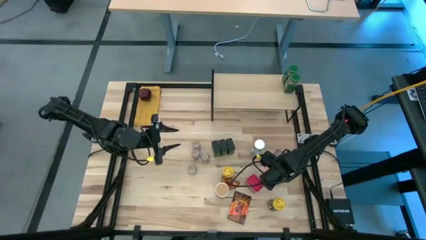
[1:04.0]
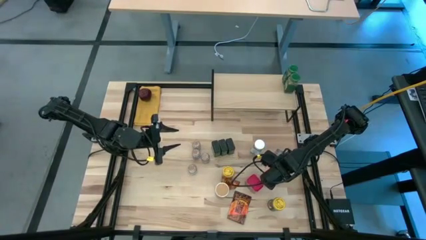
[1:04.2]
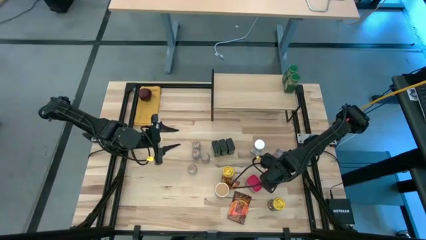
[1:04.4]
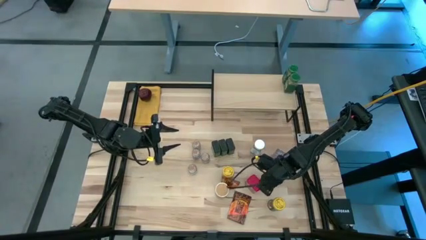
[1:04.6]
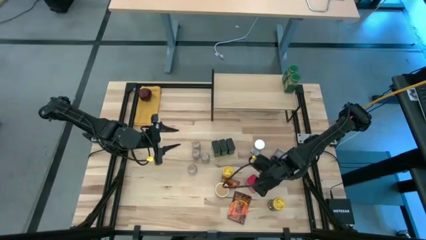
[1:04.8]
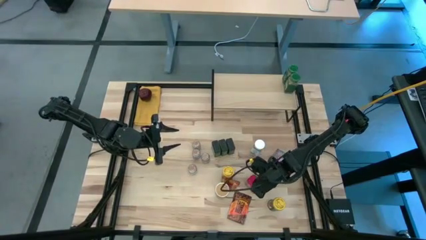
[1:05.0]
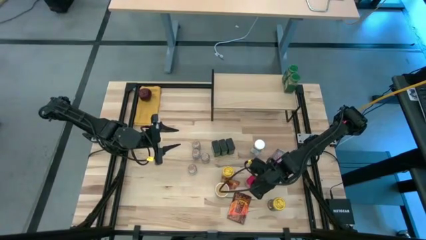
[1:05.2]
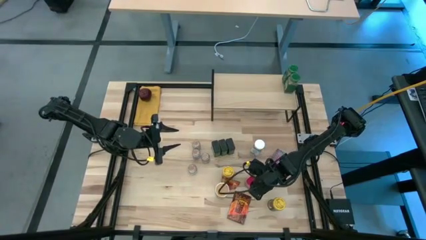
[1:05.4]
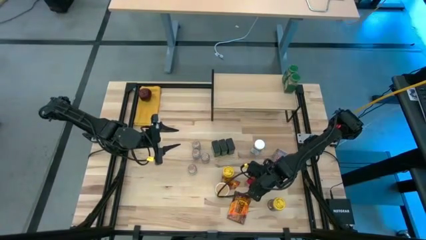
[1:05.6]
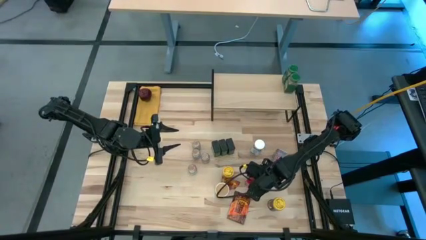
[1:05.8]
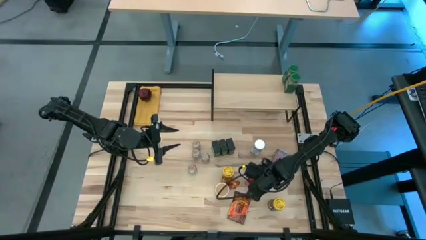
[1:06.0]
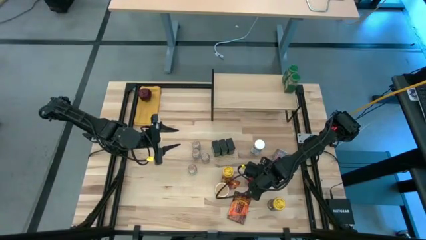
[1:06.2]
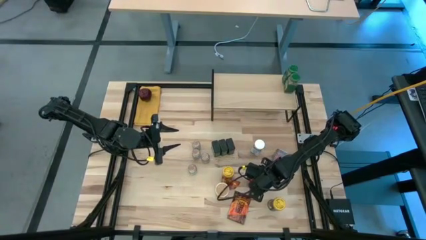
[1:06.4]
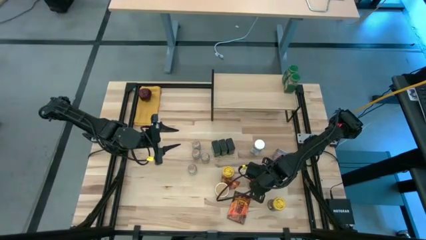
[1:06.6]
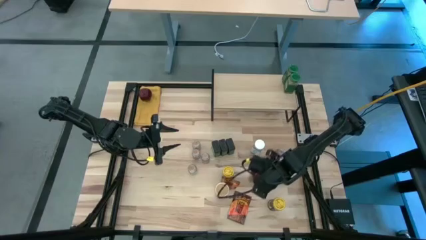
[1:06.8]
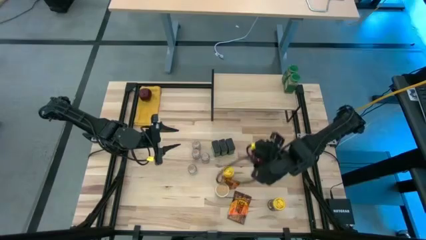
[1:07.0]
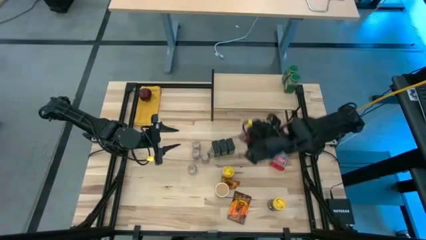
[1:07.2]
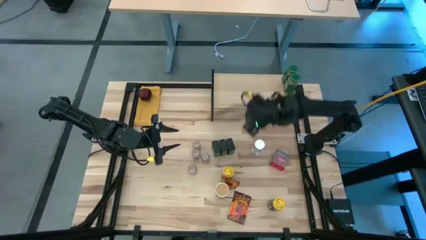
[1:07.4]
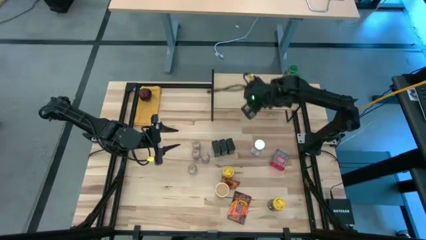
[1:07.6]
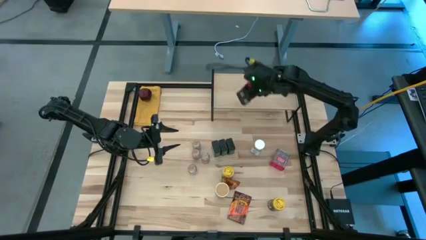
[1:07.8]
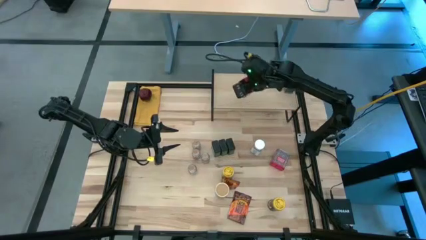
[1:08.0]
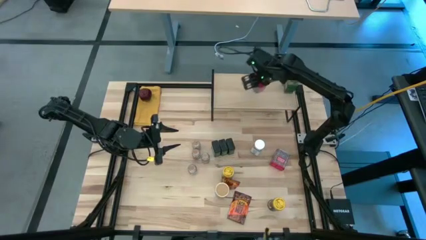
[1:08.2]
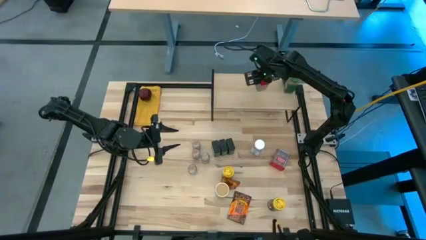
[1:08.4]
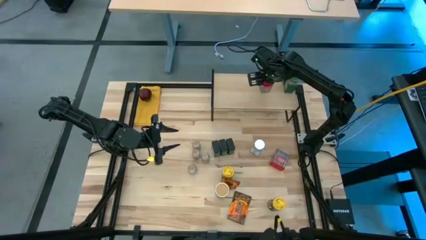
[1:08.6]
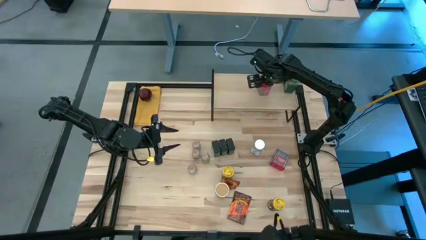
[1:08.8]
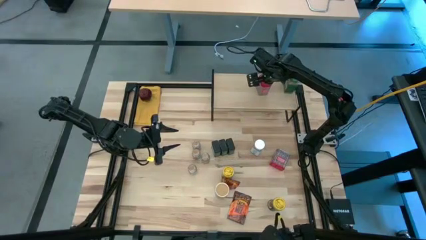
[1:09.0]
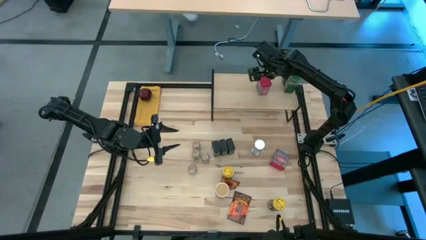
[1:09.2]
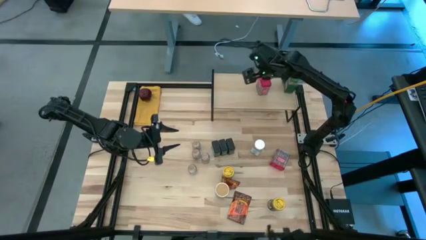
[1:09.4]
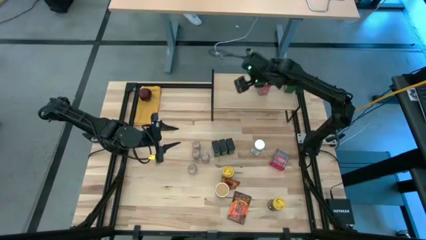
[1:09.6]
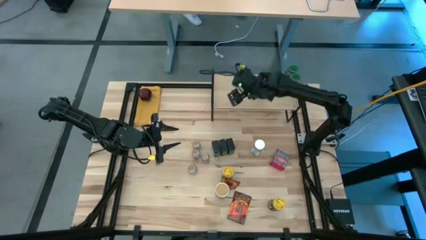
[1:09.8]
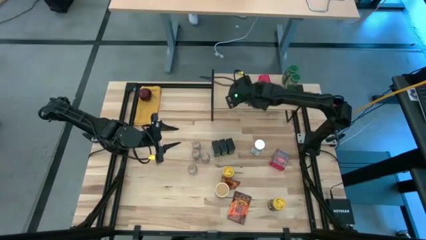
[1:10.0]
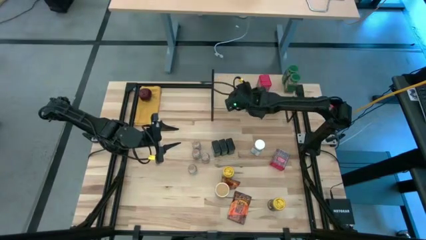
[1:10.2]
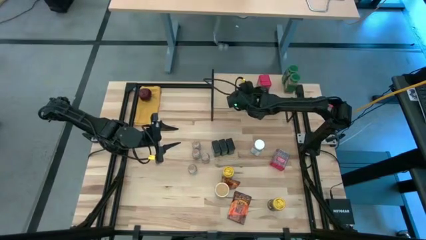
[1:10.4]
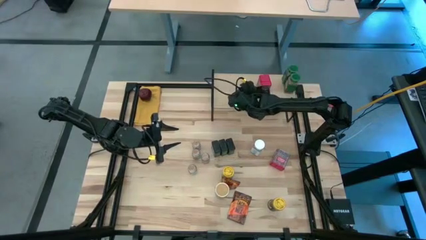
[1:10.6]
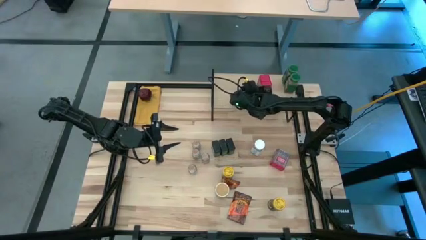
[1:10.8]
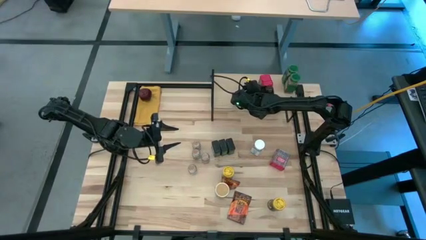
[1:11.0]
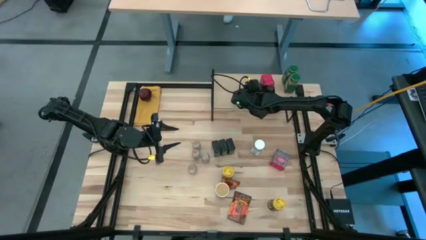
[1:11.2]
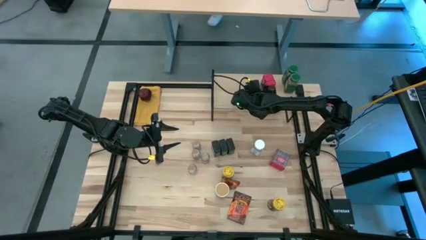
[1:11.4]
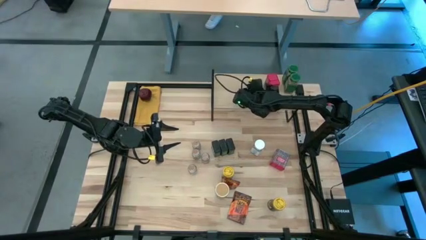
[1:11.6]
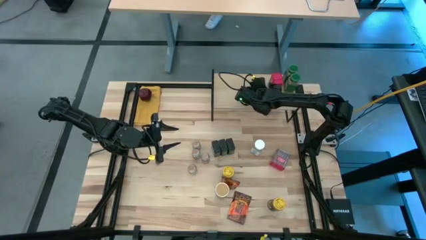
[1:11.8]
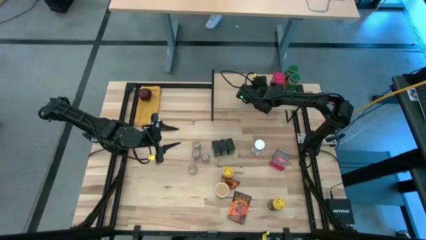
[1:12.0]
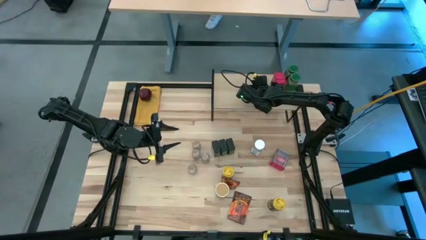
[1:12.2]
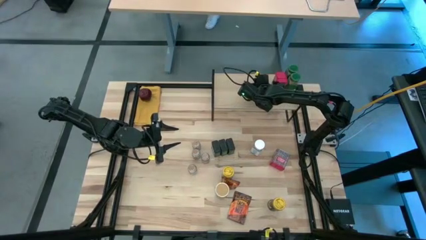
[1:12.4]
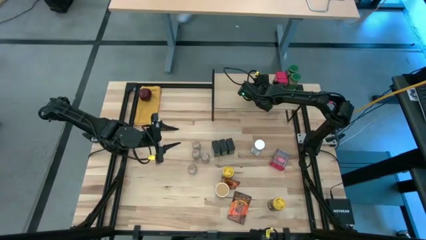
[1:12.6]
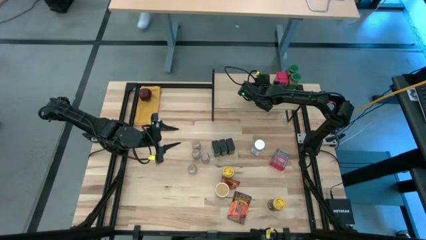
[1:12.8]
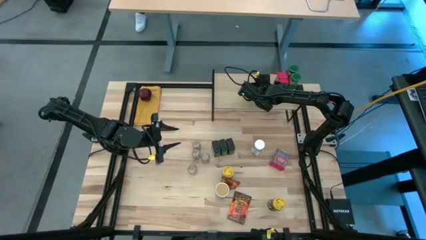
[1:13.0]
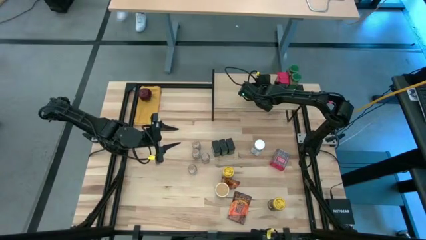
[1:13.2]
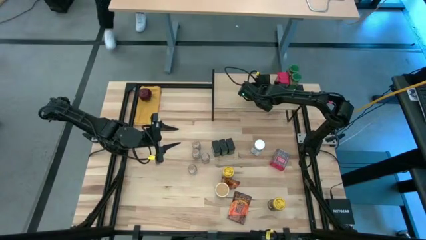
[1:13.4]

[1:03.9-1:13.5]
Task: Shelf spices
Put the bottom red seasoning can on the shelf

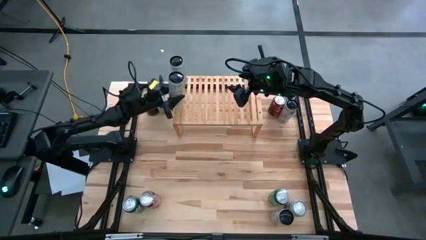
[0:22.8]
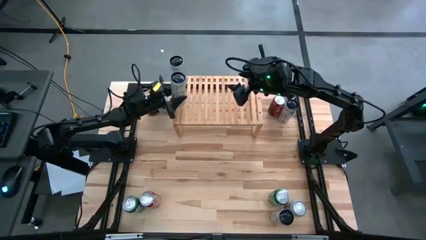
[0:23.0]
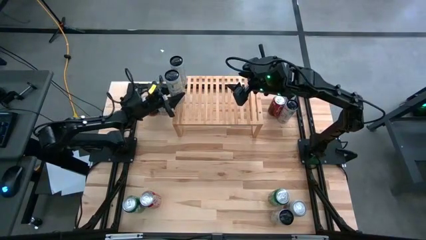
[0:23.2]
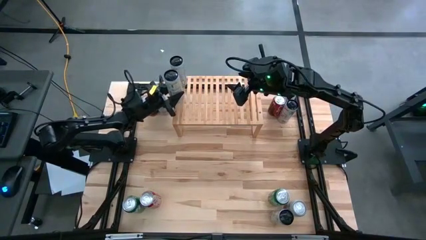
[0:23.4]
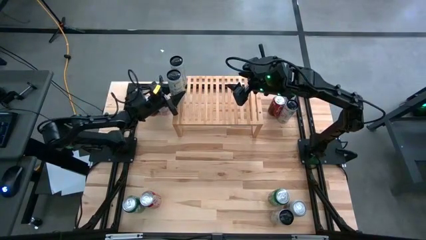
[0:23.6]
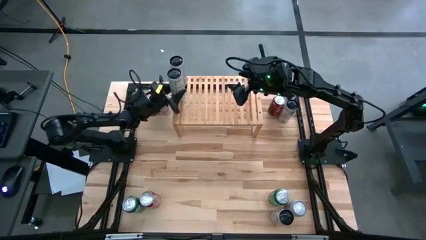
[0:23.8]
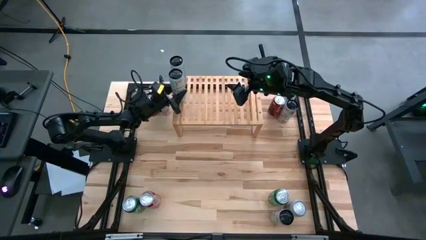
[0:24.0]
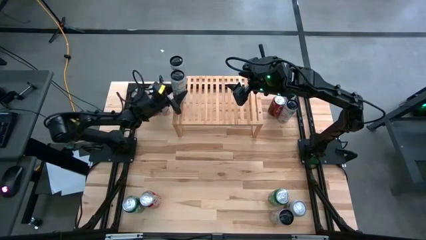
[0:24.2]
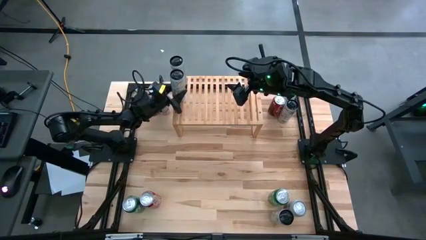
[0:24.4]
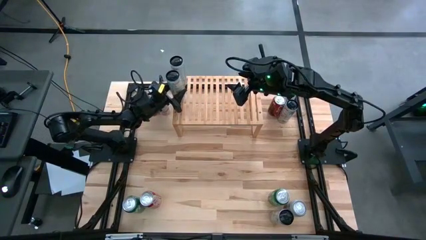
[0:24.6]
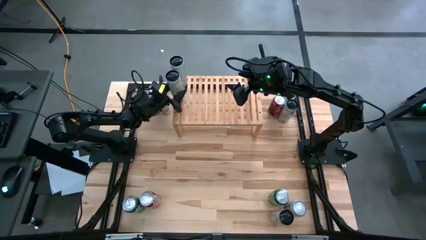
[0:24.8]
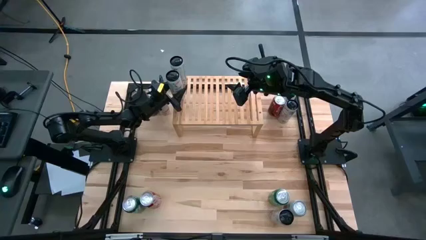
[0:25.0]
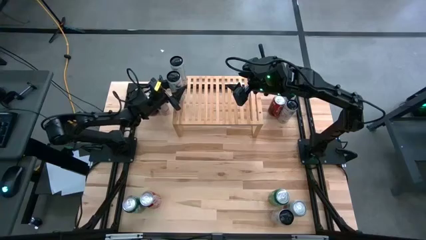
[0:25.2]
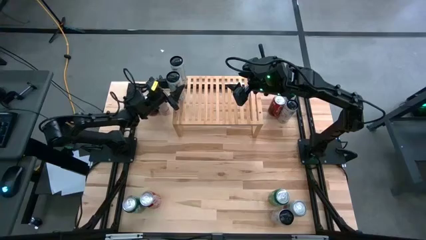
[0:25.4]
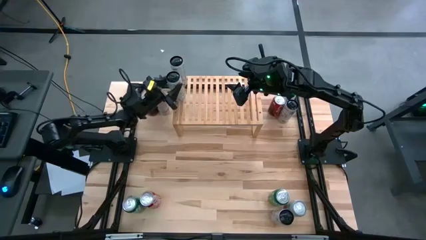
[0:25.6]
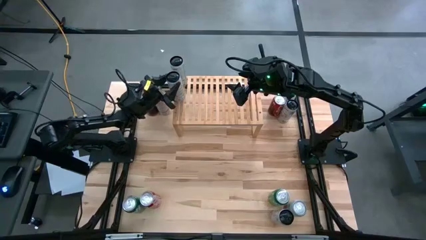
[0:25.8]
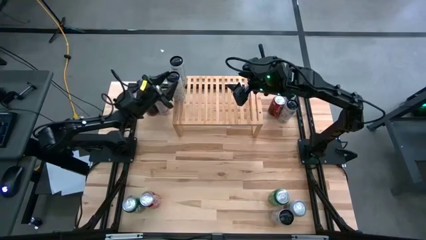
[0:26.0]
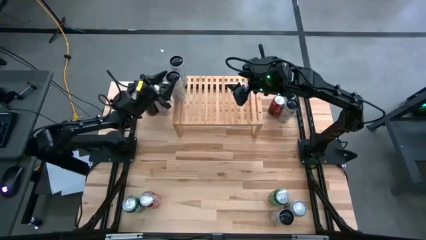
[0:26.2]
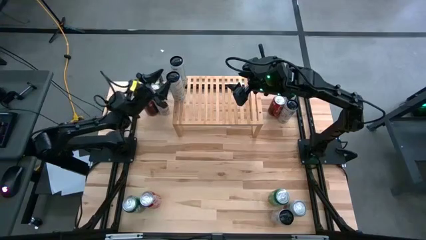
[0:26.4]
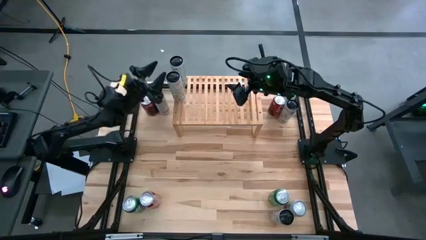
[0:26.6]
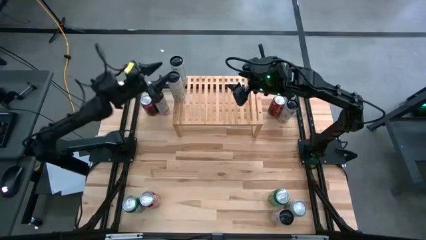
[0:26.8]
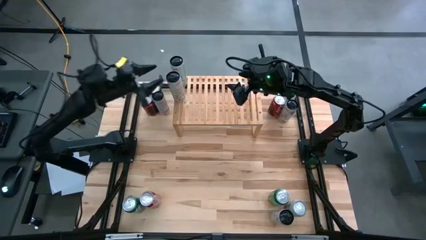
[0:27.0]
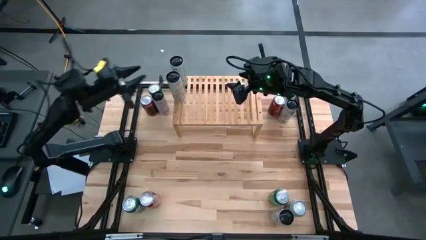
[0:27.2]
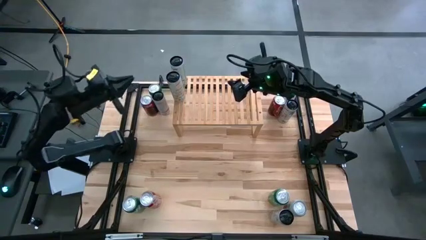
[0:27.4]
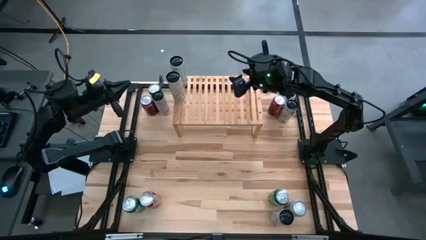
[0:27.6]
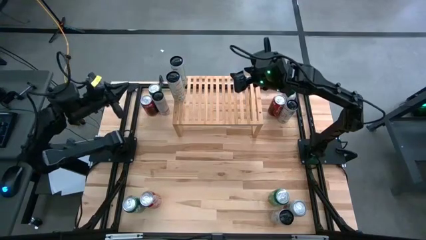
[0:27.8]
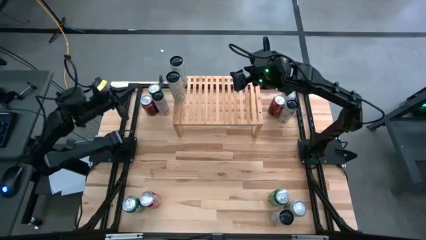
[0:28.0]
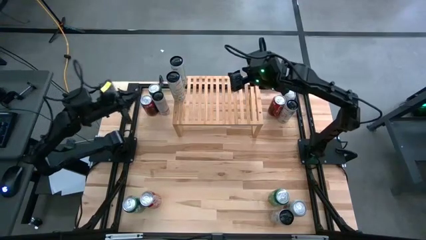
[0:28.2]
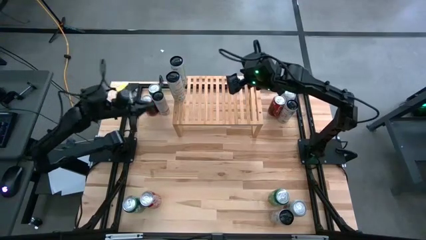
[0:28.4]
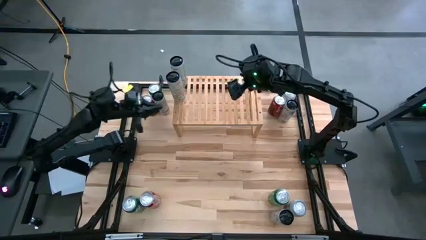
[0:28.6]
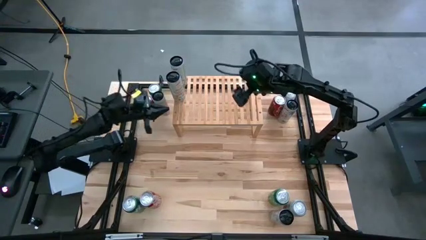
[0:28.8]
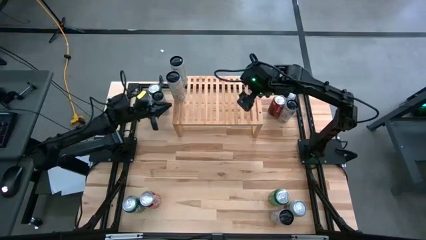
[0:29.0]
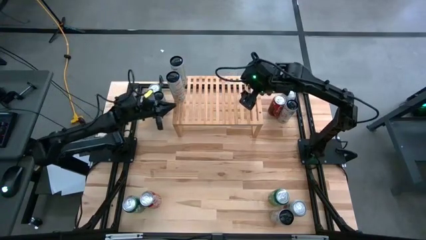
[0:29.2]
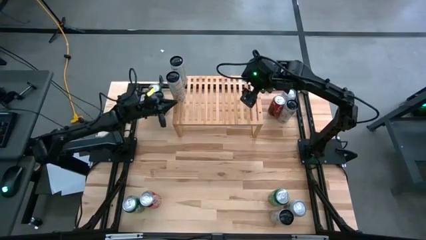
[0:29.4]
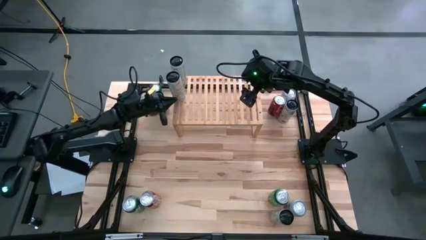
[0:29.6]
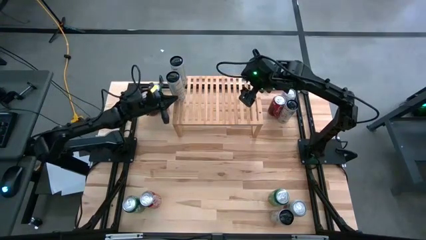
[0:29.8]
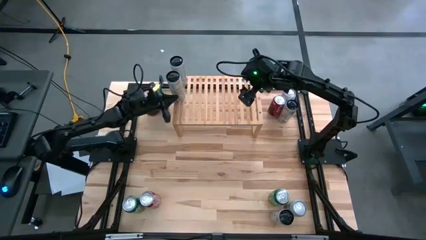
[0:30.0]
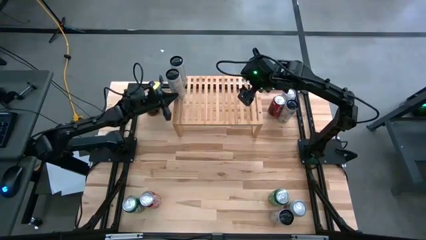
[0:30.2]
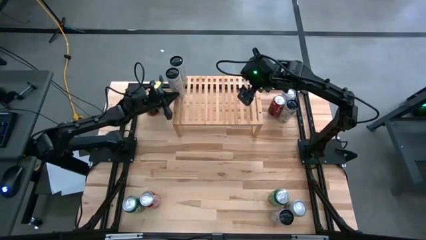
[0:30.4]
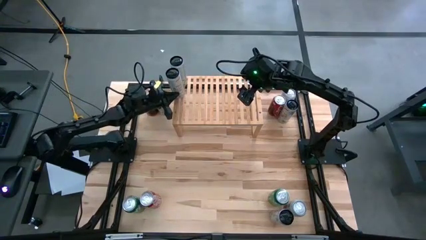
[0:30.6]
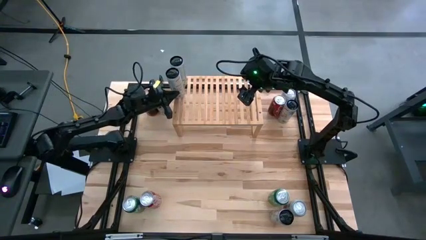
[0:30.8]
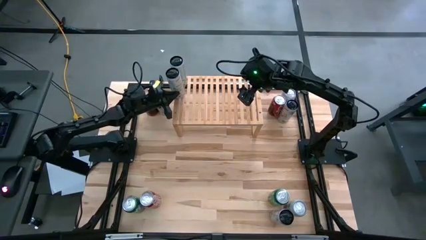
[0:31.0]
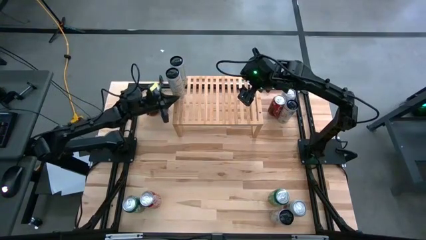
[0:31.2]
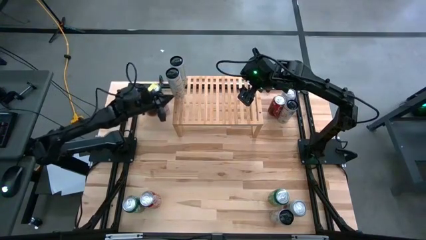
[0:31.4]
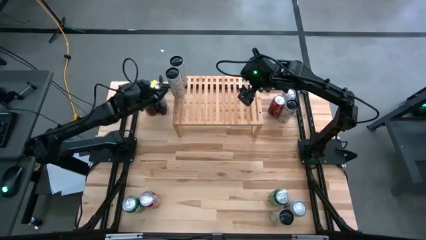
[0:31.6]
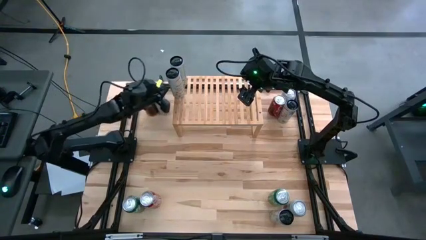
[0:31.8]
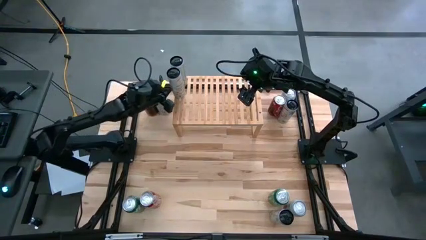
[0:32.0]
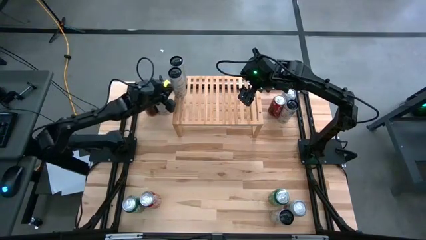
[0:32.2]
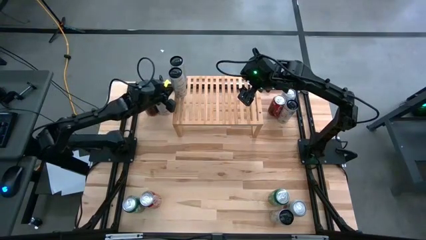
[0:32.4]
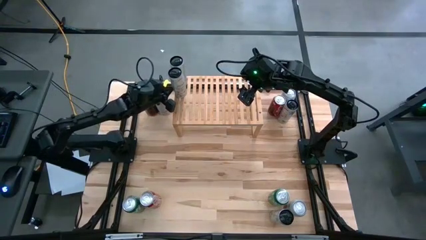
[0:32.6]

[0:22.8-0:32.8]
Task: Place canned beverage on shelf
Put the white yellow soda can on the shelf aligned with other white yellow soda can
